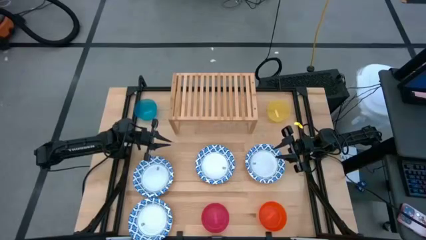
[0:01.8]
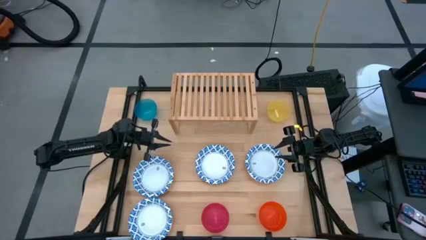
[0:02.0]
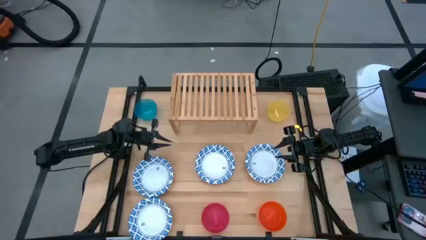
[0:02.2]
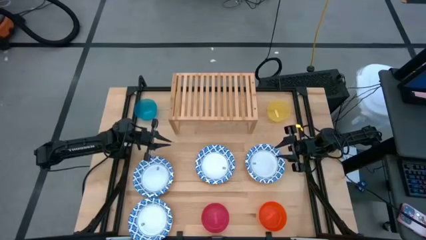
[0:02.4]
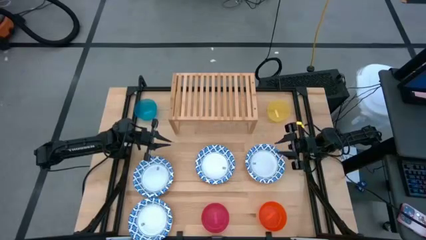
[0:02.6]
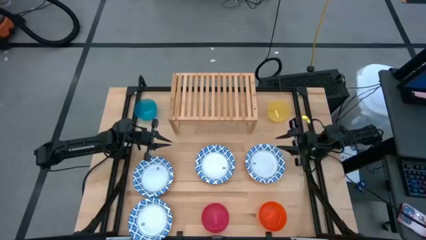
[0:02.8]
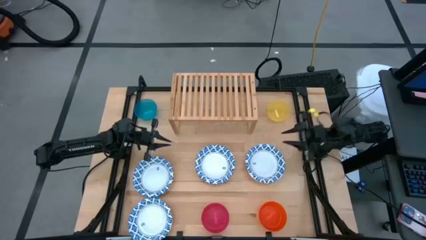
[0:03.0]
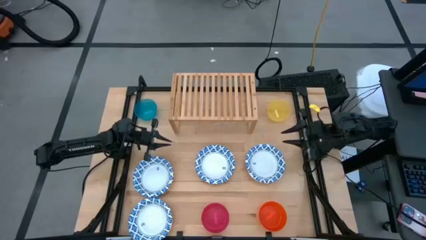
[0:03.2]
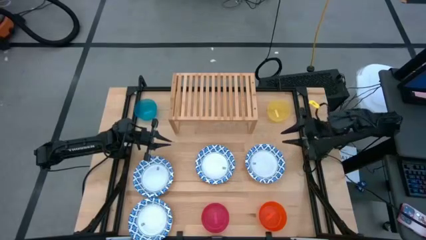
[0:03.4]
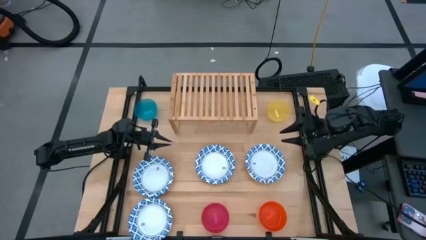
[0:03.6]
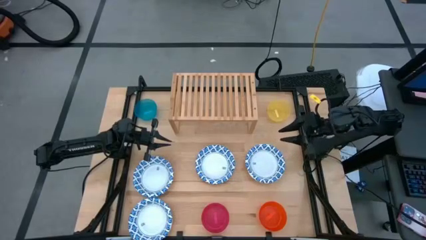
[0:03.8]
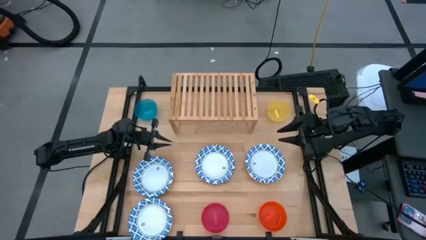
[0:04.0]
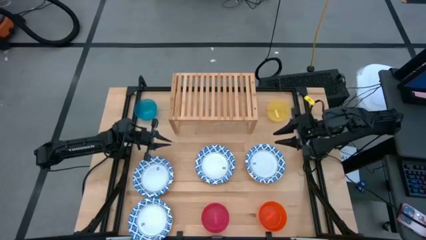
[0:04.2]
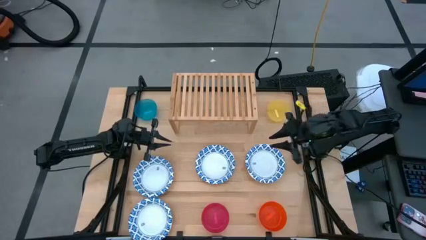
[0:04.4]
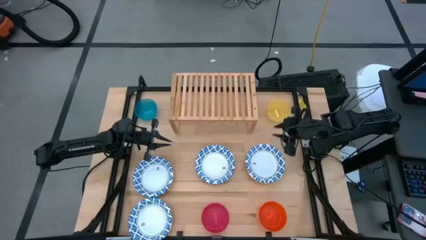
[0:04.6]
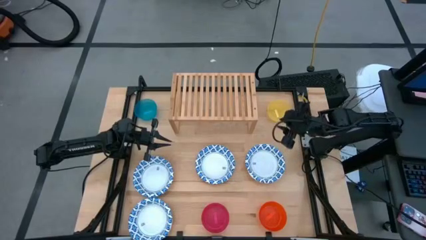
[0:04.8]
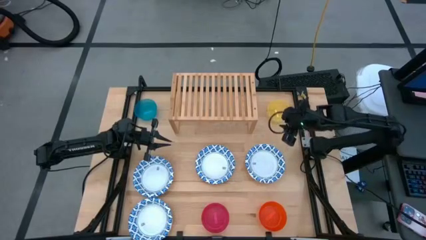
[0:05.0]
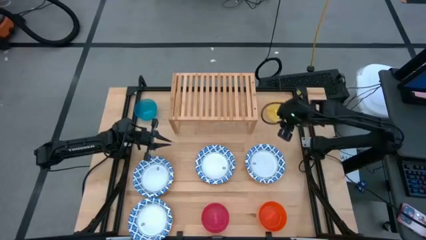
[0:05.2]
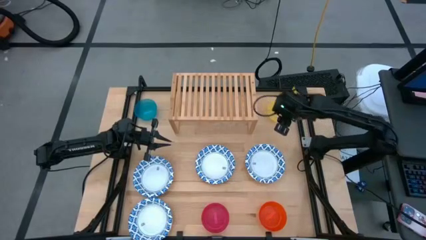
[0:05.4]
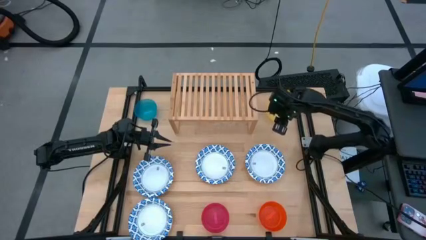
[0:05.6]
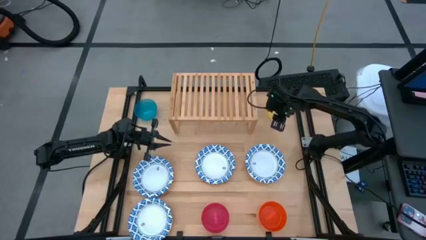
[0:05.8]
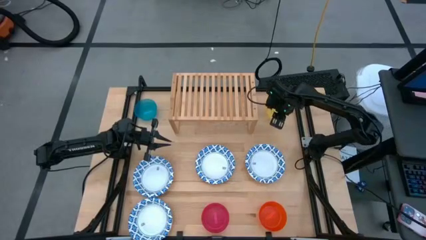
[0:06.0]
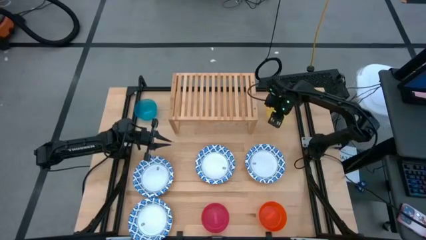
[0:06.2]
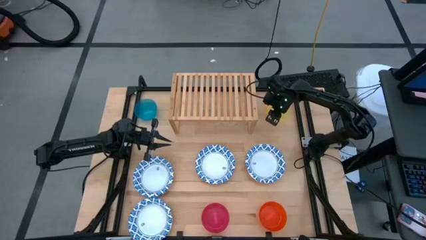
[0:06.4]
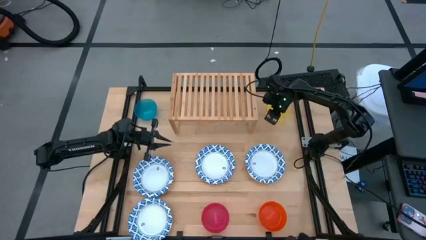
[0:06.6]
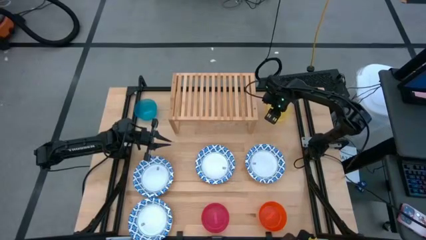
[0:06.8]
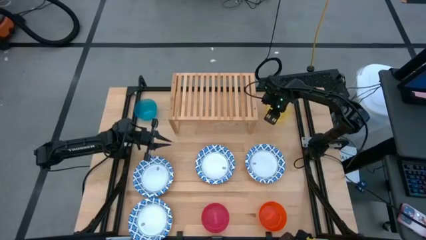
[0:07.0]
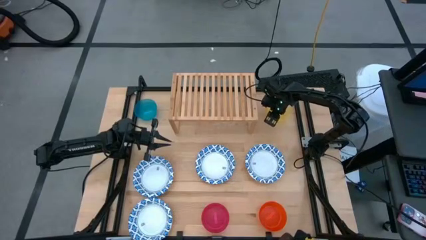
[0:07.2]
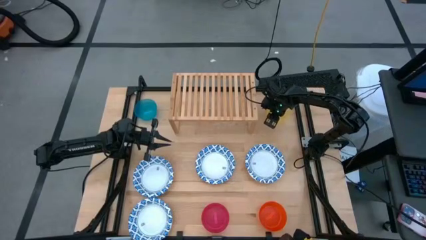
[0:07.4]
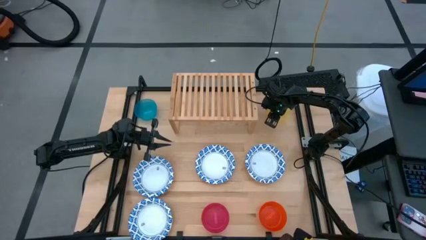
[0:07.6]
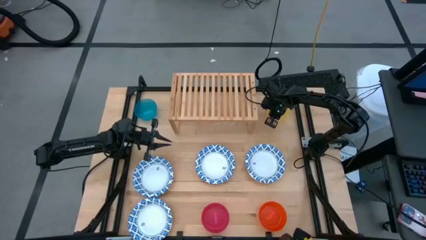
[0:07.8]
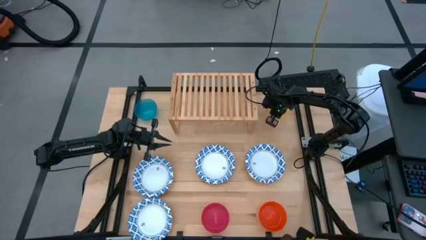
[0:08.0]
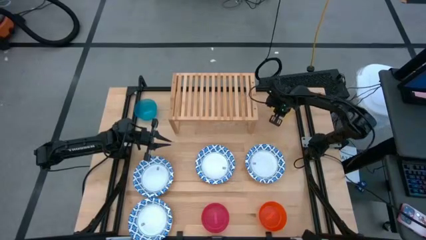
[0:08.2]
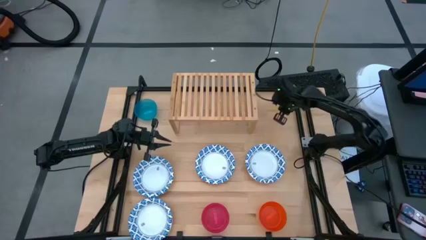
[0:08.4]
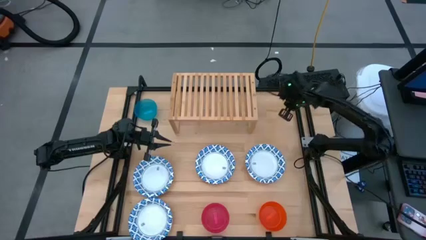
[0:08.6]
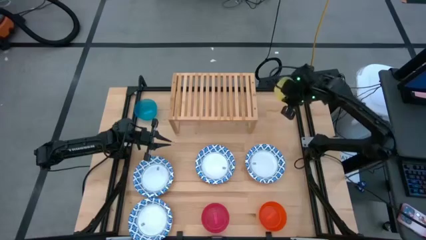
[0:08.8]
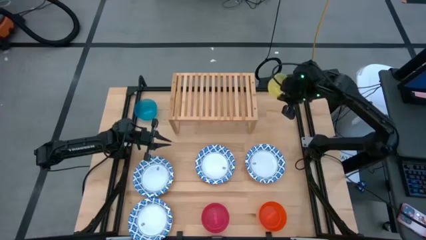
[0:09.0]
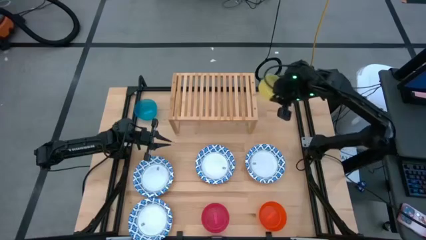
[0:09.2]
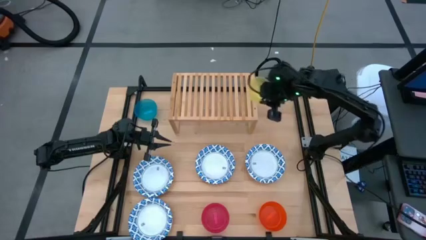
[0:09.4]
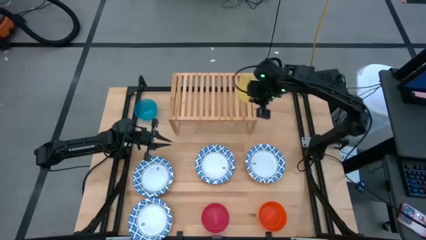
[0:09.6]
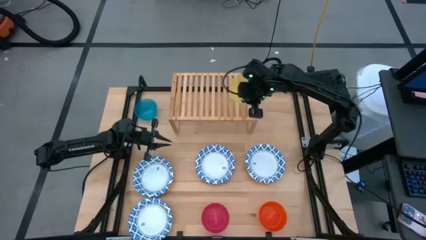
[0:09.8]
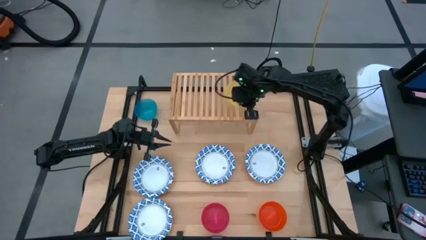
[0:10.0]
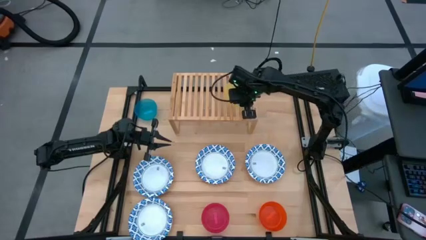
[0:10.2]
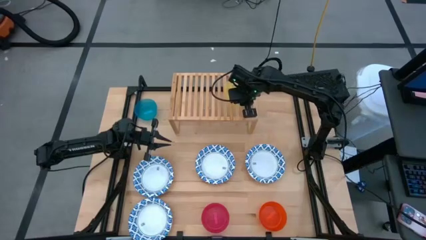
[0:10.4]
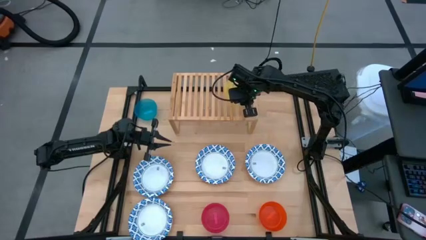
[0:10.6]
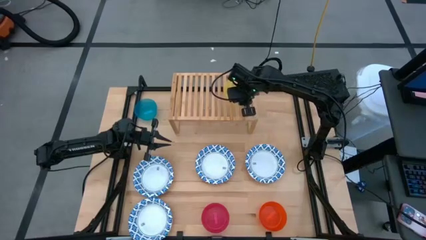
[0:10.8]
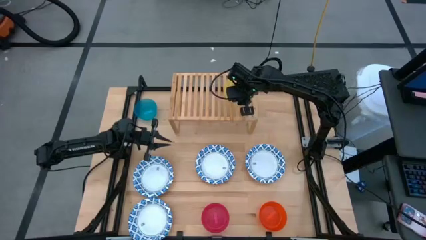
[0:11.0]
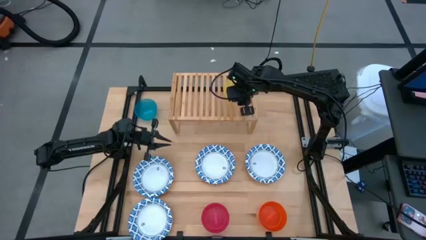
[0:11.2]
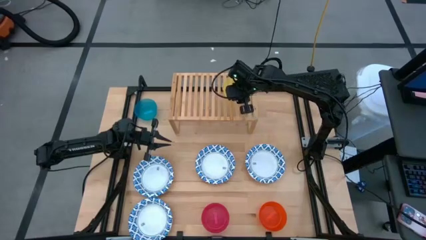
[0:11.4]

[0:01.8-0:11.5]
Task: Place and stack bowls onto a shelf
Put the yellow bowl on the shelf

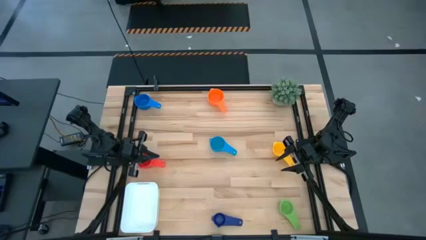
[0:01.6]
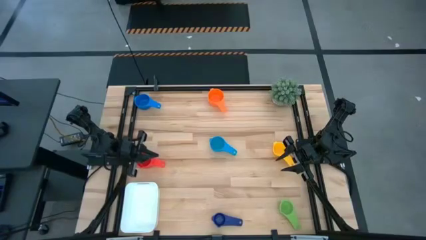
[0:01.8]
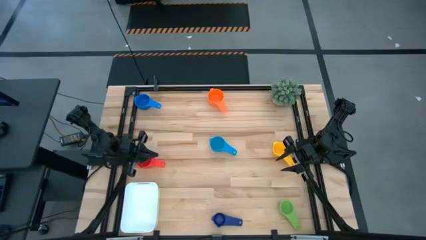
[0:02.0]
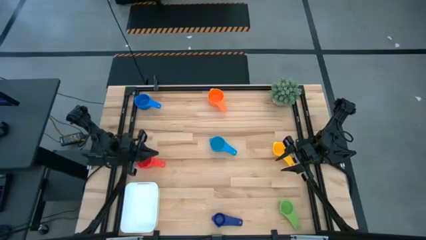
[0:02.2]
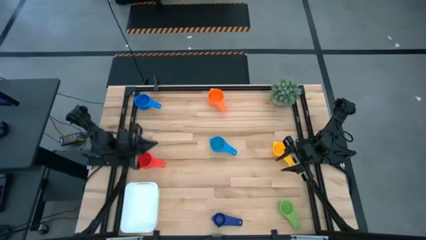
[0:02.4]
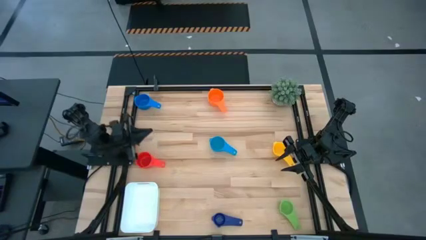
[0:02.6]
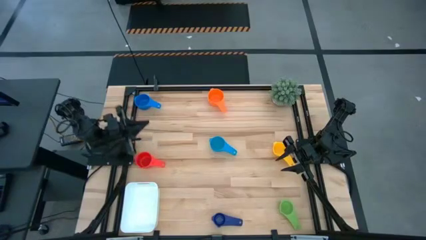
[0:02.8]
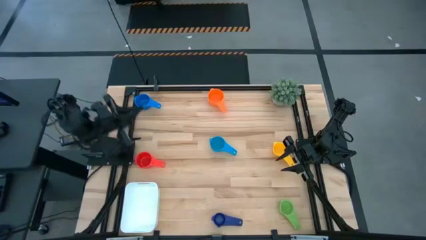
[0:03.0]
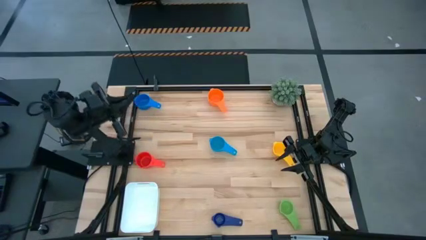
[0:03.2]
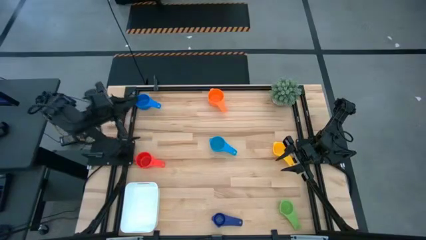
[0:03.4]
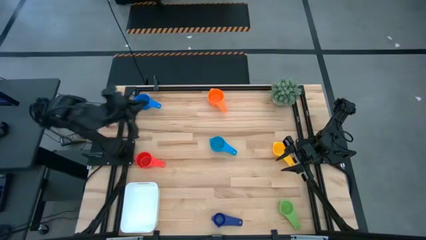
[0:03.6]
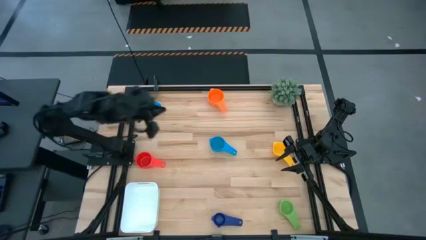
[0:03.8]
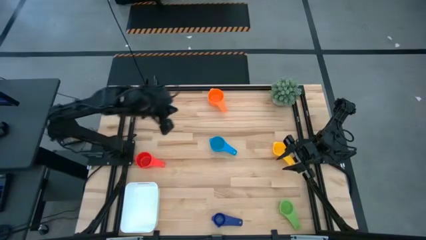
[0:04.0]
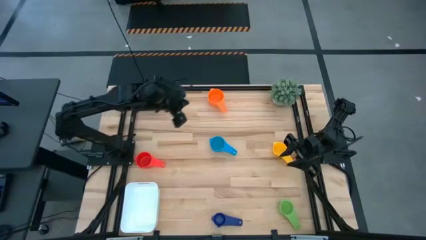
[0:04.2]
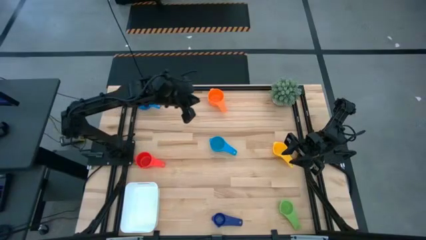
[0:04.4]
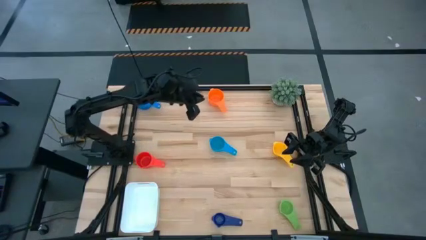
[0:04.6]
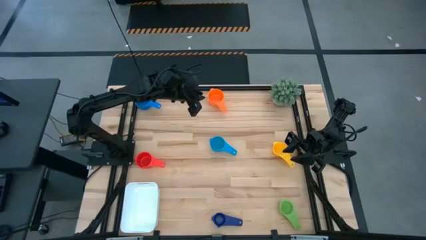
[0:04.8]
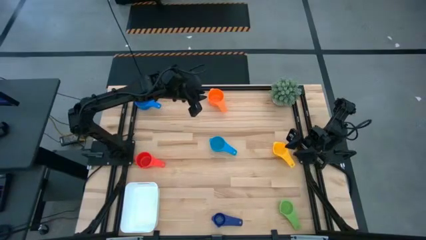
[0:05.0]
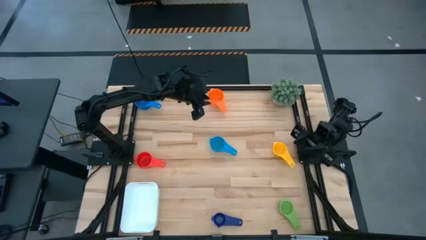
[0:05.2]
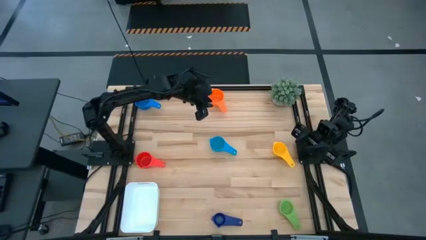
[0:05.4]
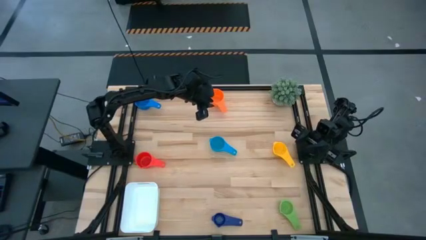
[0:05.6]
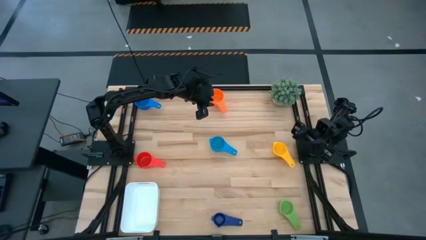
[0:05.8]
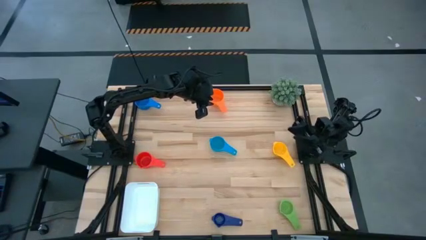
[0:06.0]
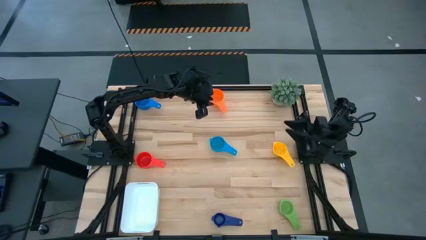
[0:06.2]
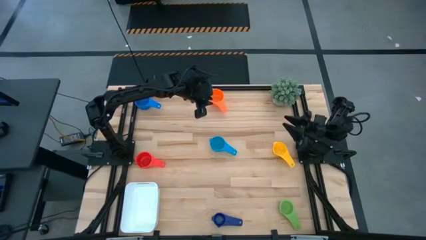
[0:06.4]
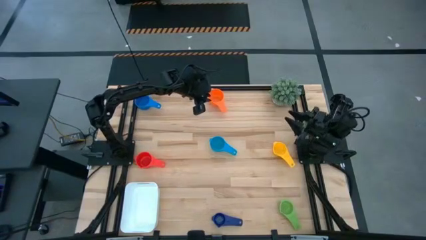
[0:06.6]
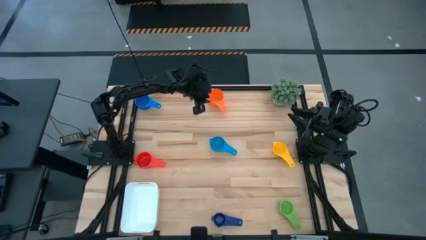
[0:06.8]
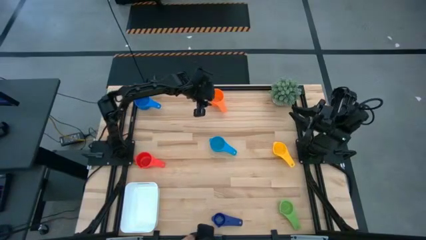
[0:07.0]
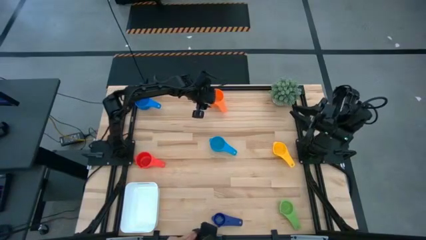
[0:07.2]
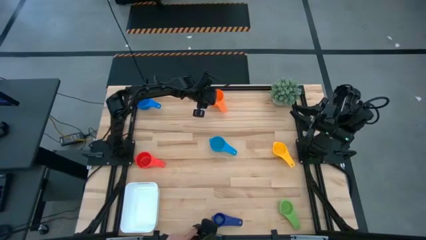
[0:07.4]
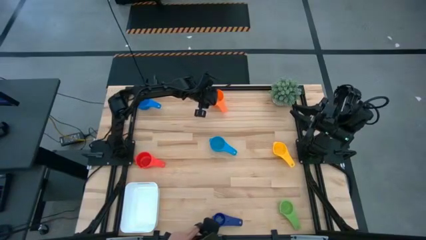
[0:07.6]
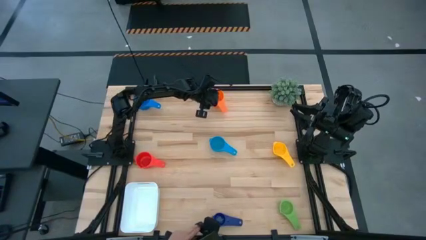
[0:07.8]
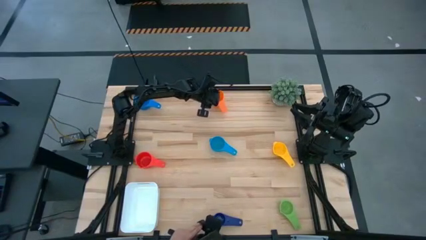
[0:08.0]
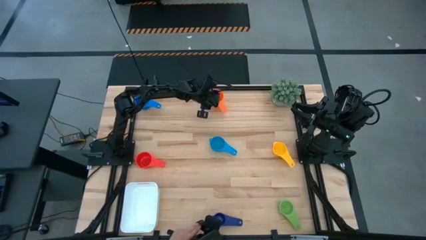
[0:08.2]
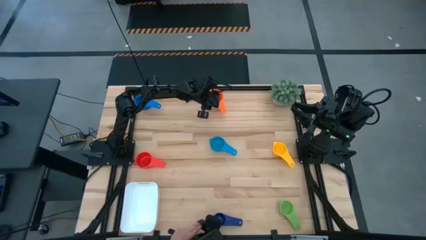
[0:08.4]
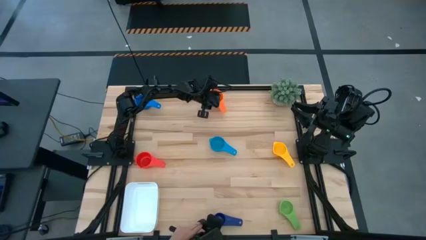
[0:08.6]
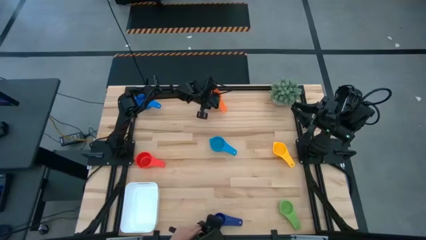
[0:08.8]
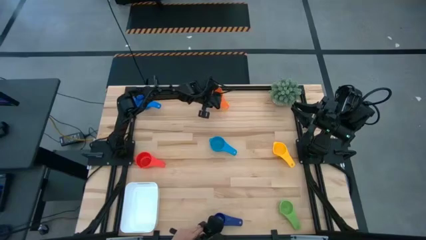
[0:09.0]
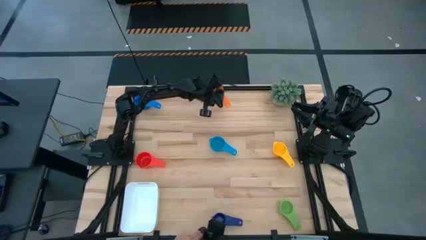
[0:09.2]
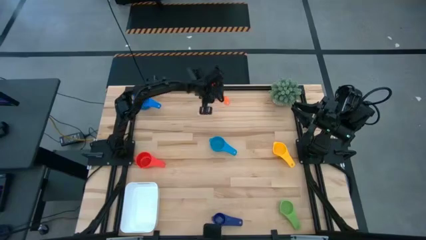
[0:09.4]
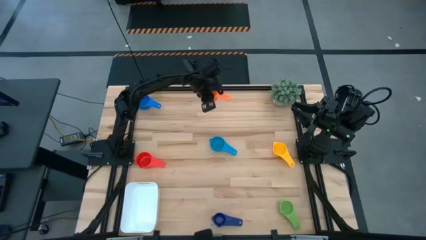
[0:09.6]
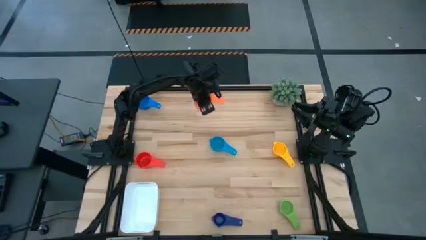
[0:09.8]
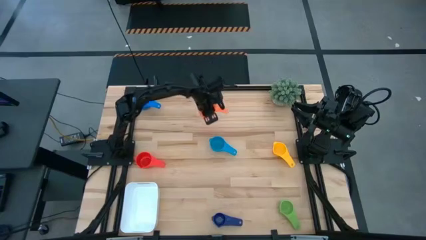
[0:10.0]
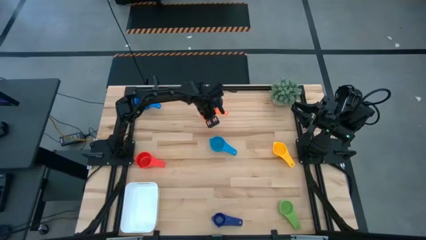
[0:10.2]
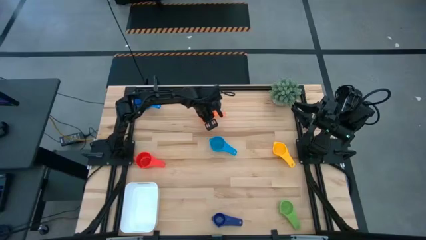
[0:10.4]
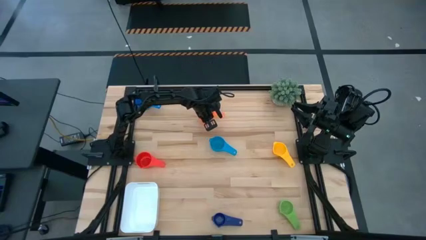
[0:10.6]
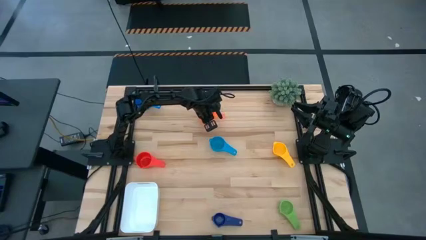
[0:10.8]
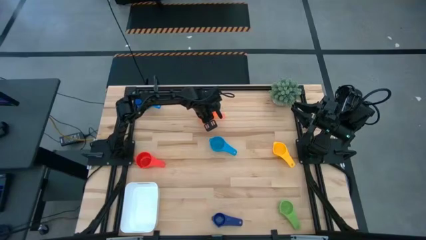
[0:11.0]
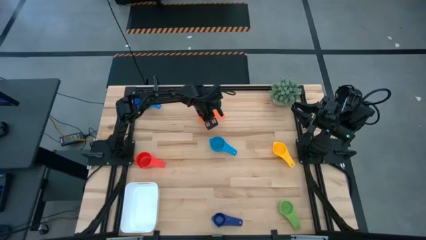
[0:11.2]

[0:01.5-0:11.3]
Task: Nest measuring cups in basket
Move the orange measuring cup to the center of the table
